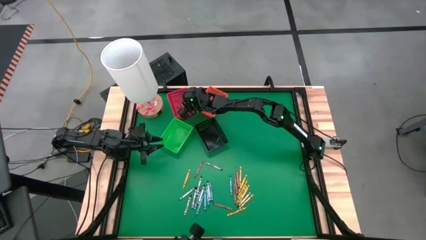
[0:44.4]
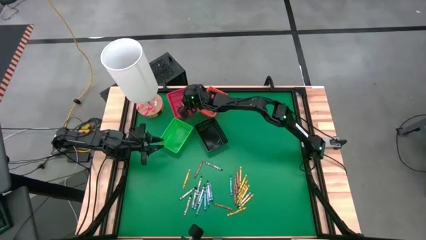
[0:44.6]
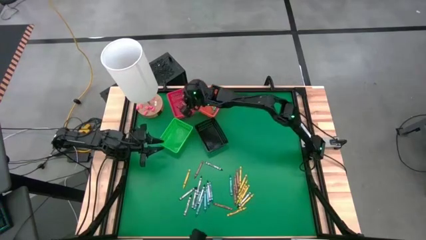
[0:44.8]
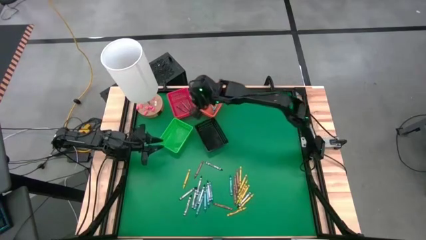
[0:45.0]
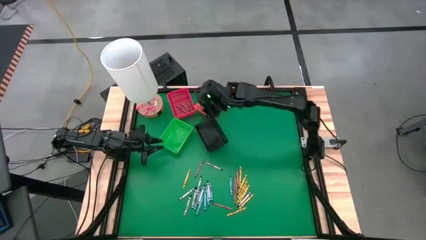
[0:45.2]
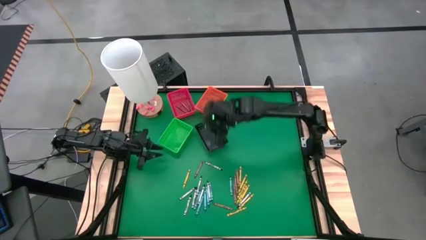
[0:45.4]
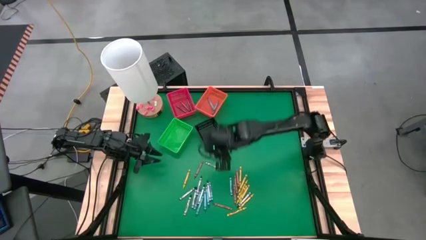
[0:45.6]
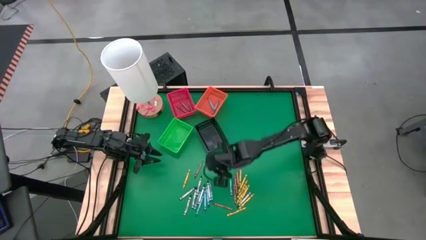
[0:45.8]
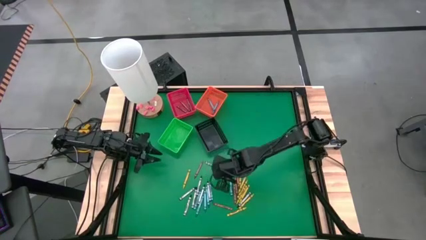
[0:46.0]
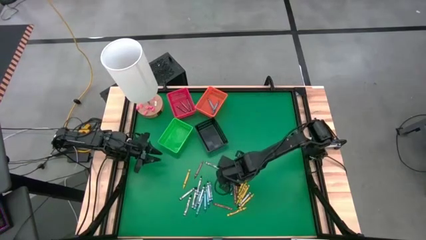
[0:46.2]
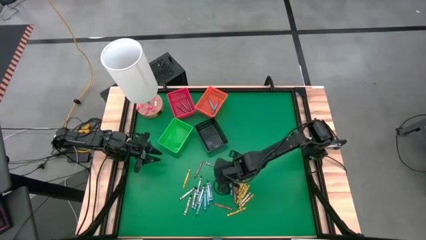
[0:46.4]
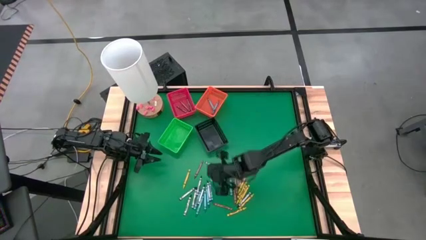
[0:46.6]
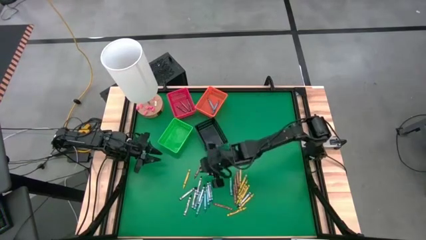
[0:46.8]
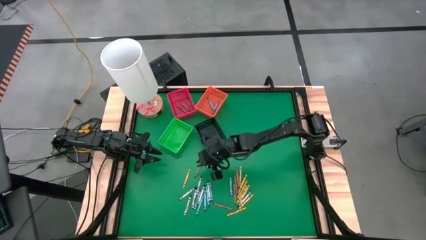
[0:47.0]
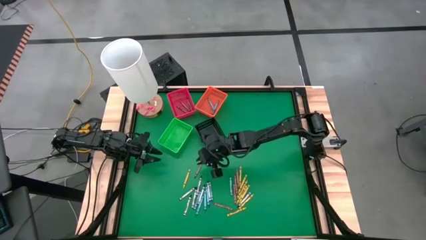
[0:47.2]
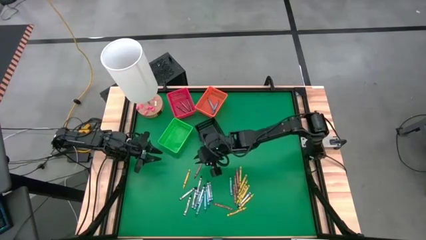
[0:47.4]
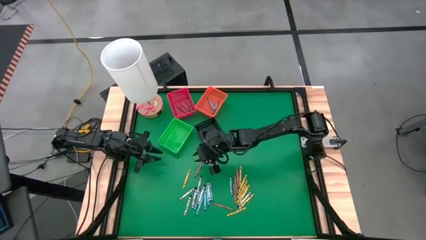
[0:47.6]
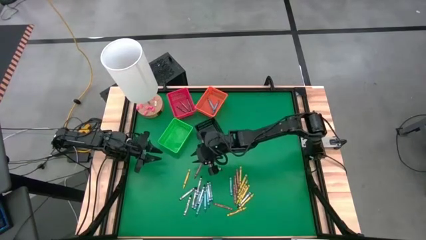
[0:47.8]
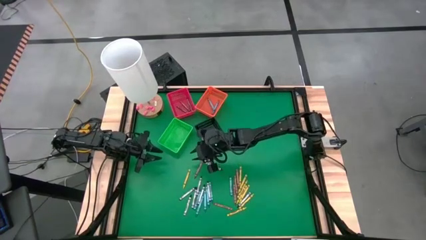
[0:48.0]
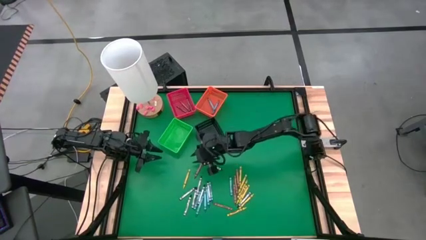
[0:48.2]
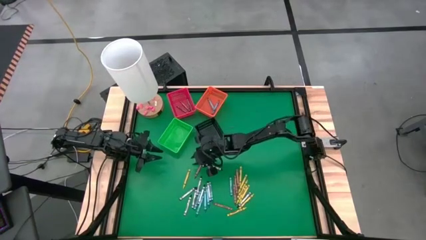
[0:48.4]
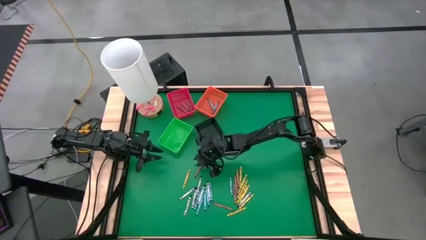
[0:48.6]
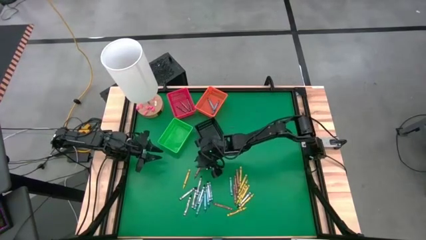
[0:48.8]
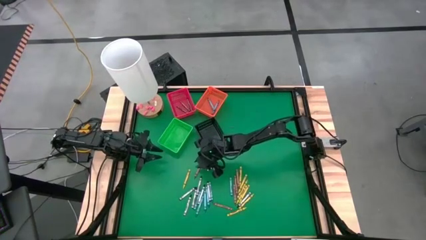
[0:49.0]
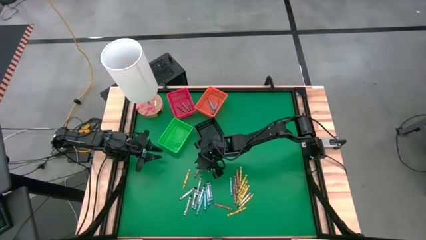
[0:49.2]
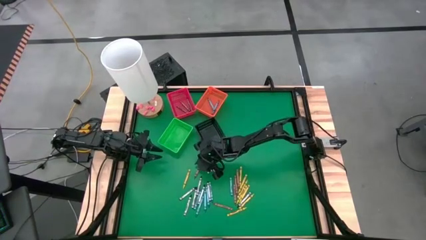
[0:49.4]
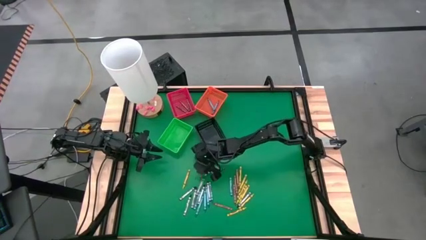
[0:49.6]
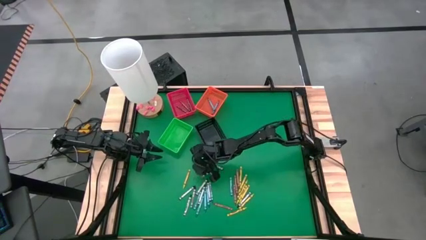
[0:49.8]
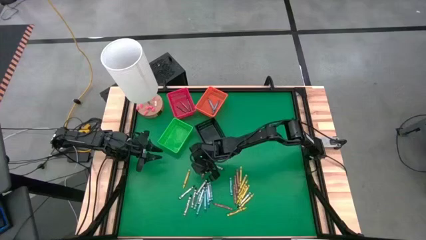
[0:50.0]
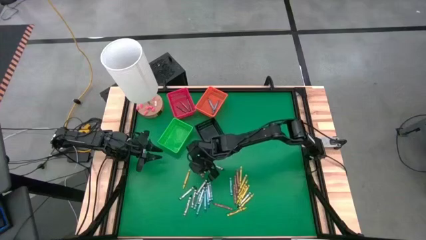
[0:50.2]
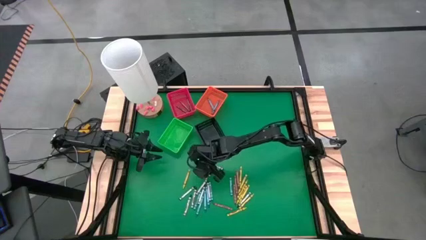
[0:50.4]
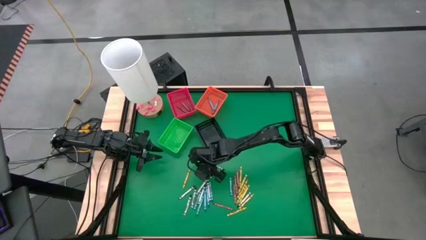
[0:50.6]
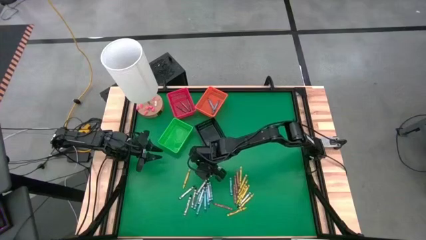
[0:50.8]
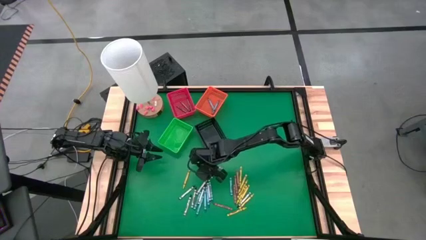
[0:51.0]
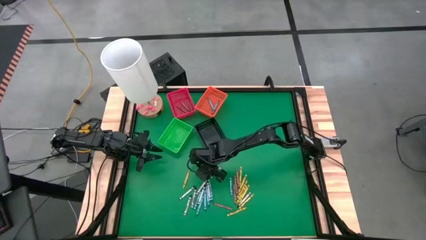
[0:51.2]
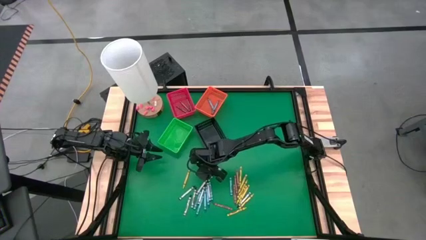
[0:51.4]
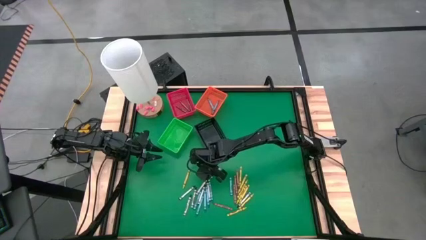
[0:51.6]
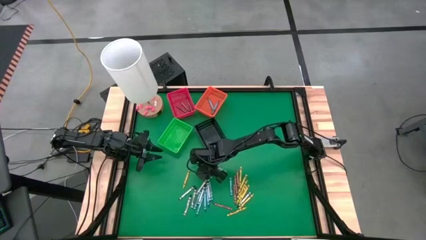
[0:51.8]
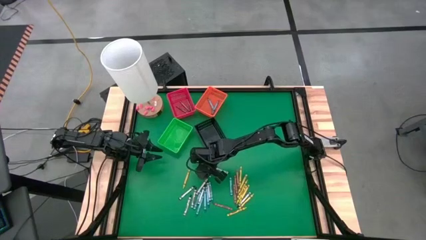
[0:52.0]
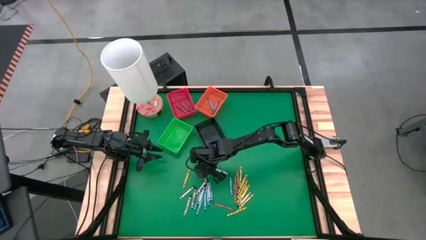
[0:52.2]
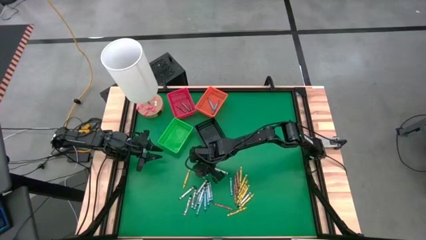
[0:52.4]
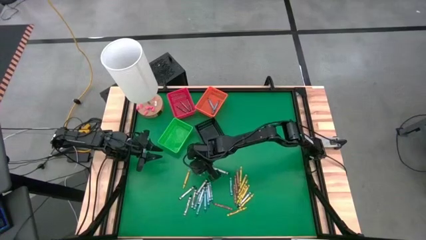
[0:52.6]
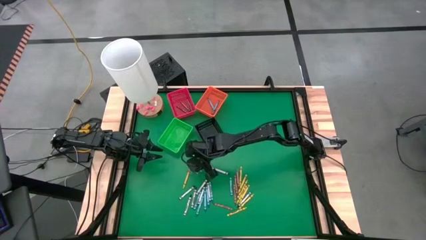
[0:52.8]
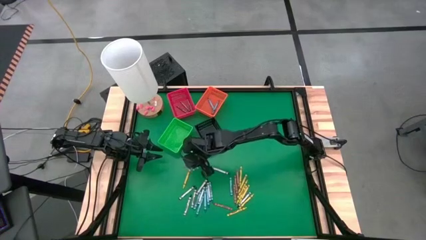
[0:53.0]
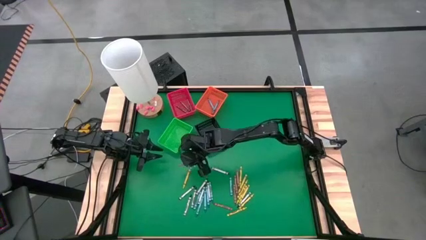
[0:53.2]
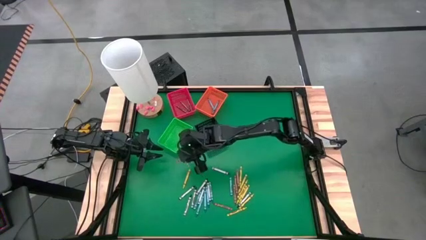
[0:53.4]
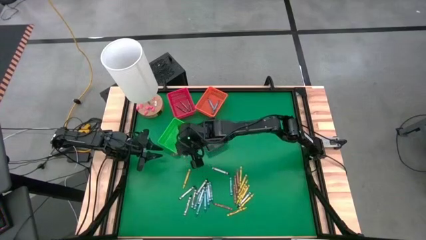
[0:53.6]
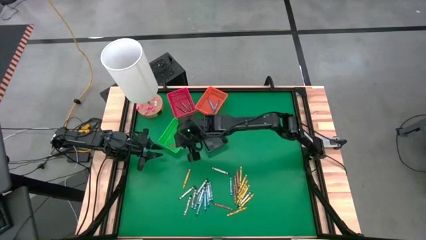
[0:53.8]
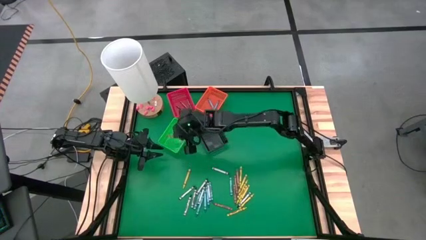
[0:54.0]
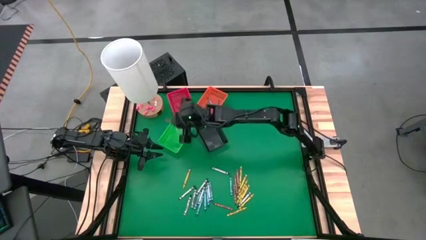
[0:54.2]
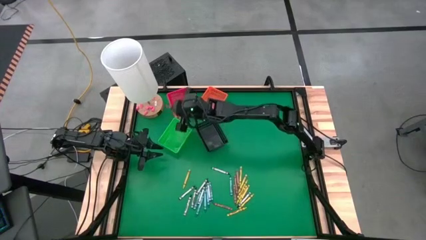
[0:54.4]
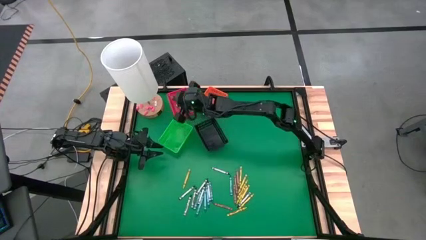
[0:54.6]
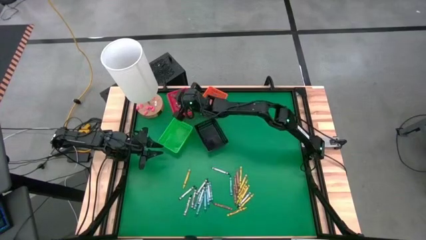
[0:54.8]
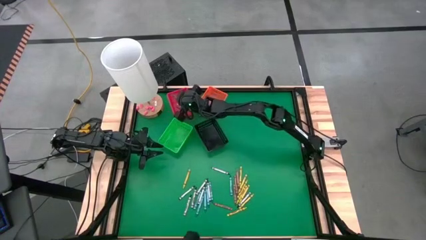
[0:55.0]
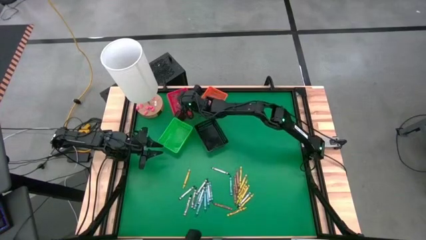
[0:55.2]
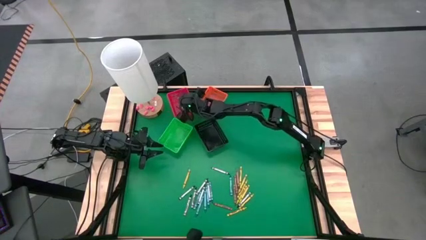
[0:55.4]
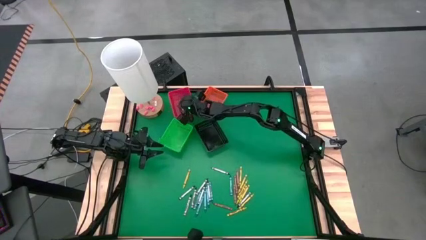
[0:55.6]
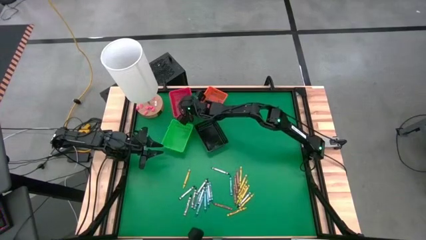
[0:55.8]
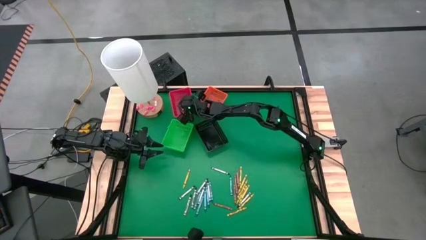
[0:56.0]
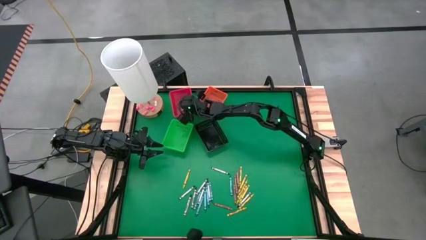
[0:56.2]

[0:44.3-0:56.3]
Task: Sort crayons
Put the brown crayon into the red bin
